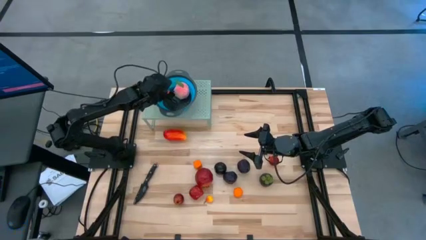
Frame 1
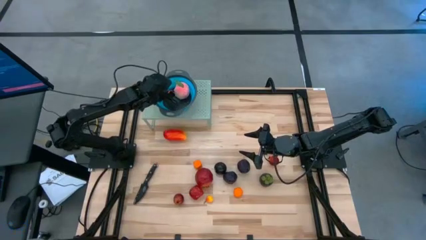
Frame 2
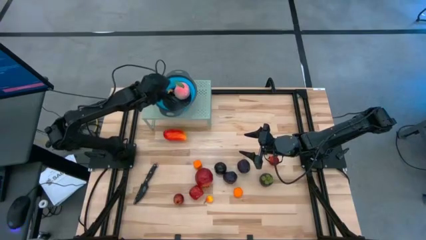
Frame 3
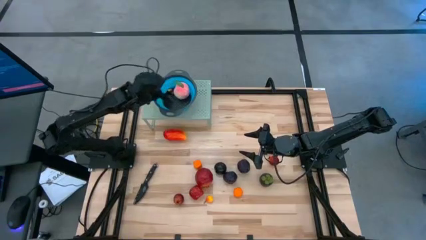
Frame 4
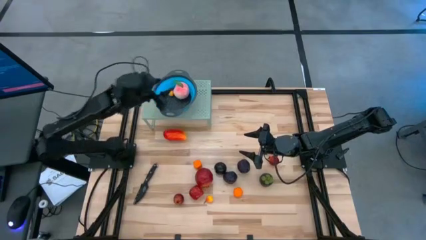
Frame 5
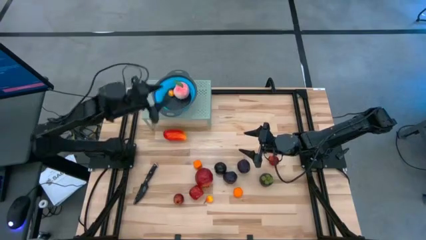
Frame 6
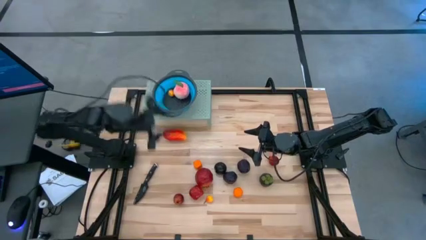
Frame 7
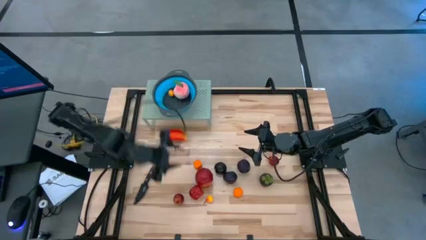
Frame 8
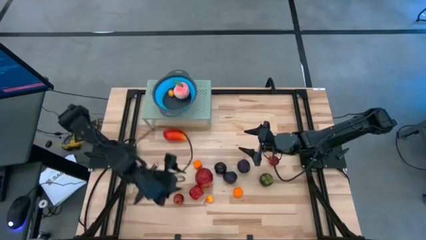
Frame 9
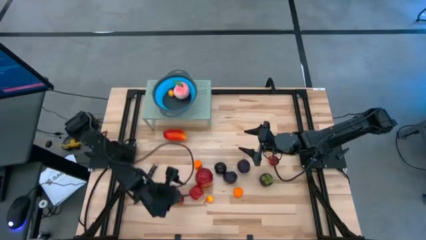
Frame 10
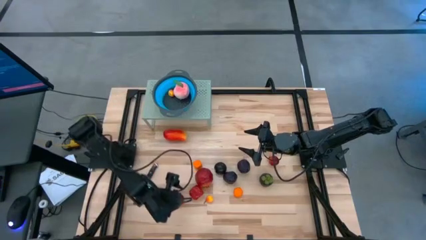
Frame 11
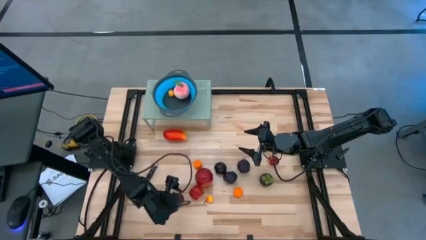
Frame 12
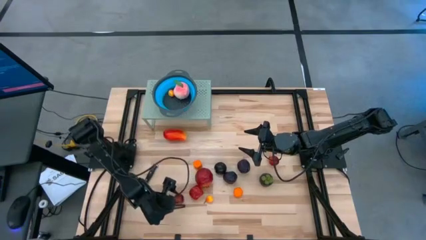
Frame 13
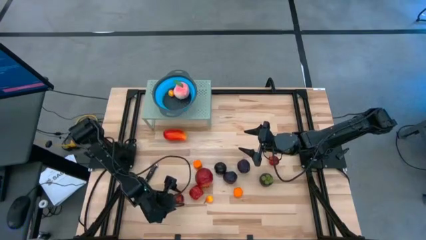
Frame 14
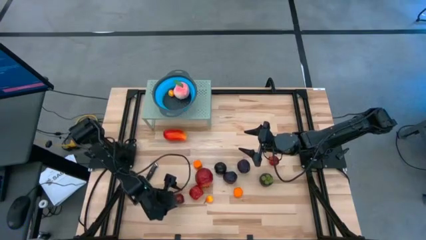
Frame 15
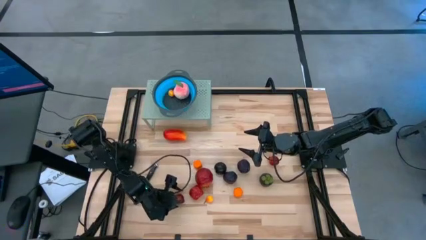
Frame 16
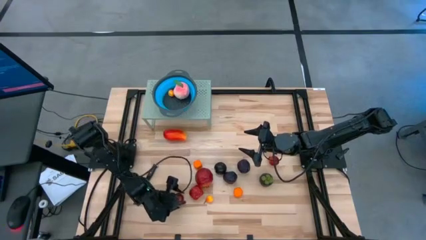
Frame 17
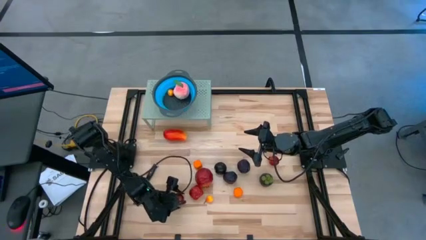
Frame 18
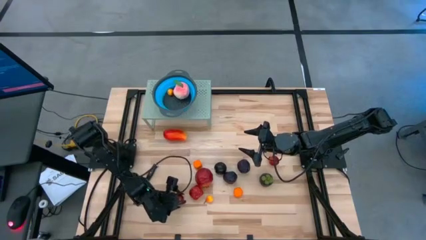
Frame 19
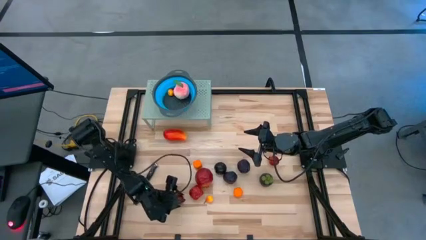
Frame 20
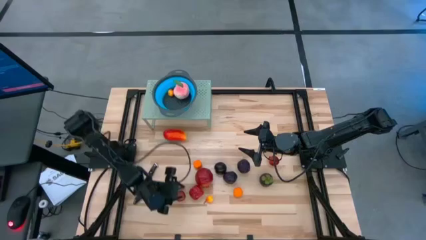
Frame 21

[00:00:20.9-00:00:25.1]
Task: Pick & Place Fruit
Put the bottom red pomegranate into the blue strainer bowl on the shelf

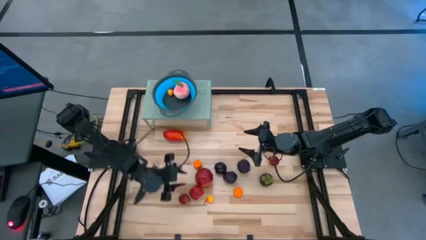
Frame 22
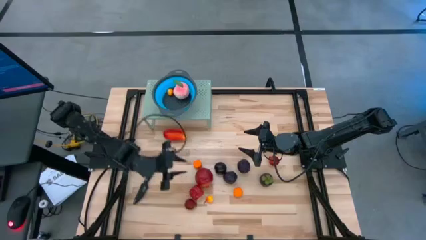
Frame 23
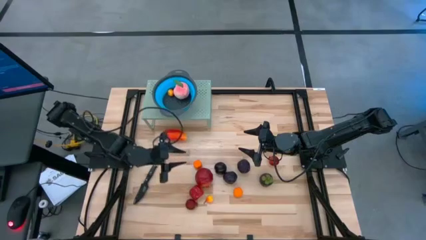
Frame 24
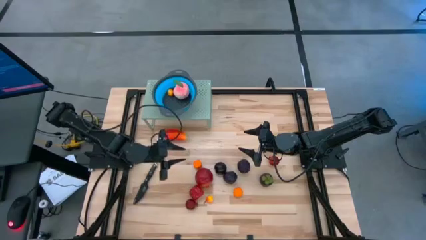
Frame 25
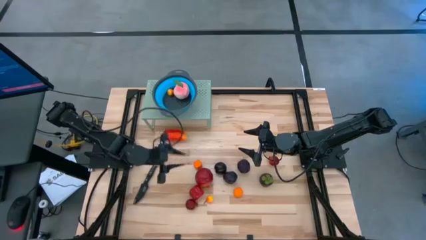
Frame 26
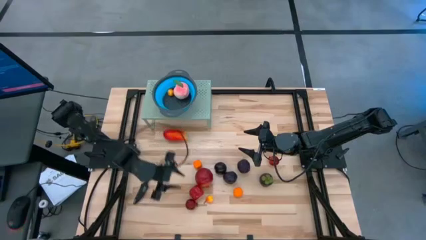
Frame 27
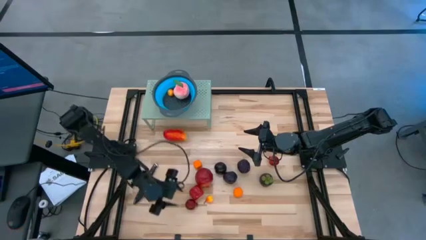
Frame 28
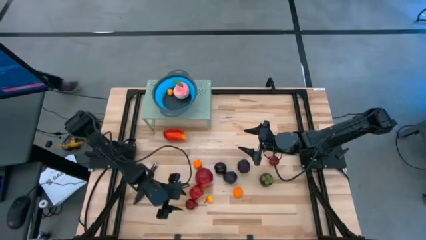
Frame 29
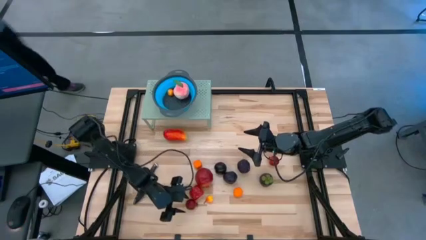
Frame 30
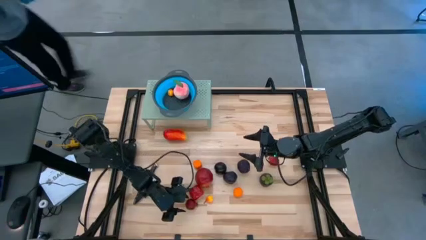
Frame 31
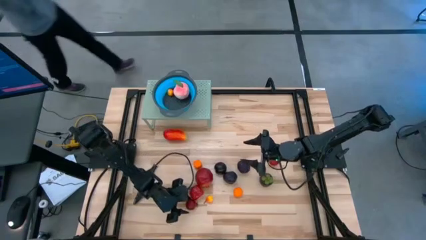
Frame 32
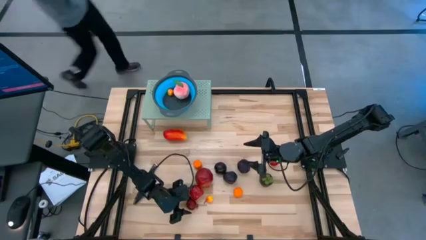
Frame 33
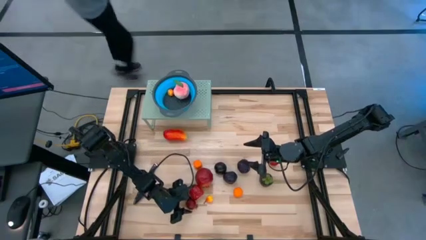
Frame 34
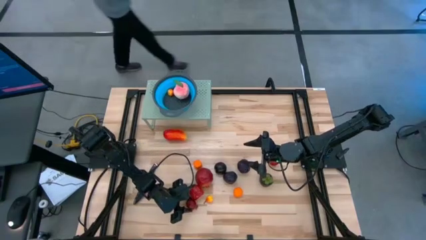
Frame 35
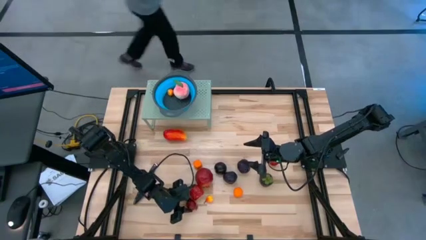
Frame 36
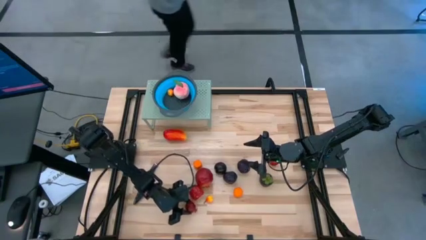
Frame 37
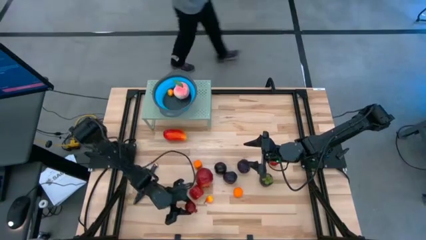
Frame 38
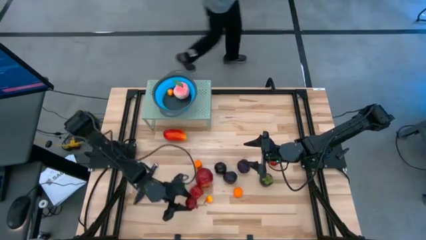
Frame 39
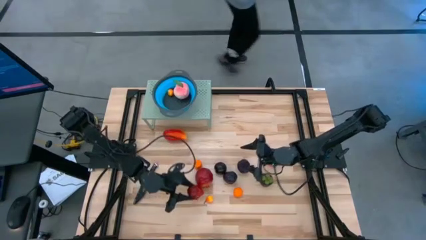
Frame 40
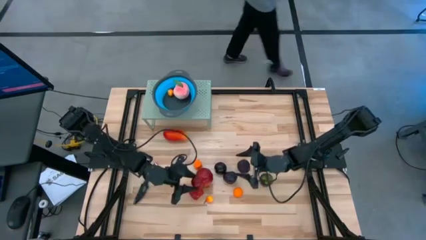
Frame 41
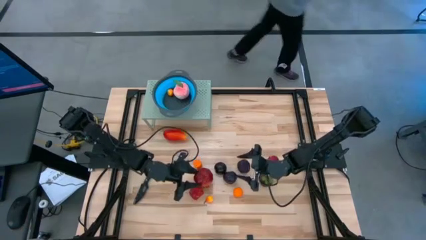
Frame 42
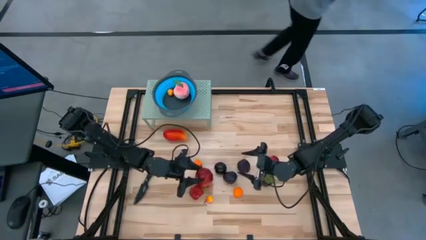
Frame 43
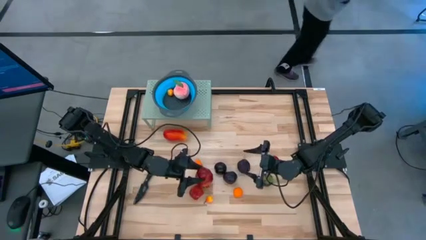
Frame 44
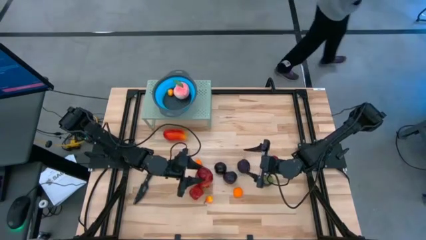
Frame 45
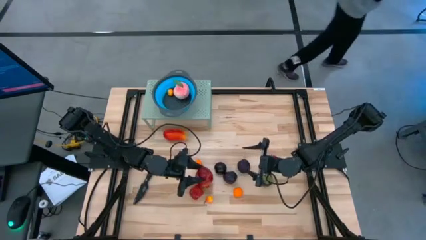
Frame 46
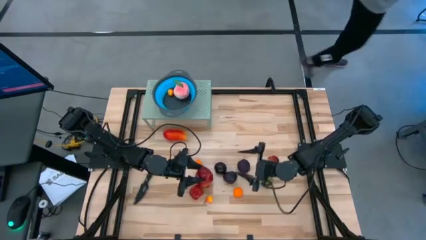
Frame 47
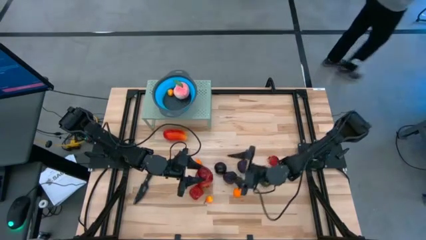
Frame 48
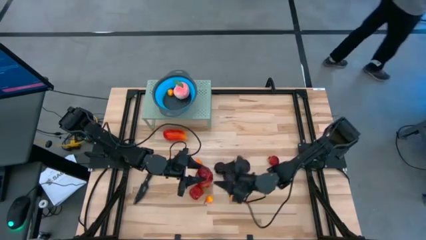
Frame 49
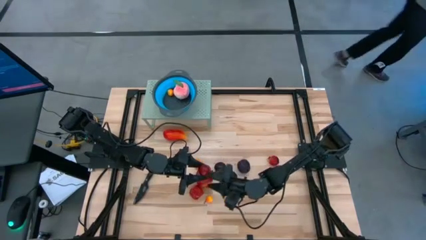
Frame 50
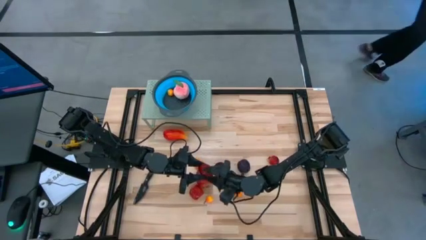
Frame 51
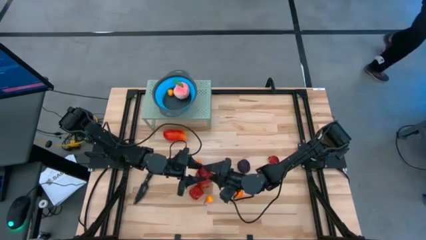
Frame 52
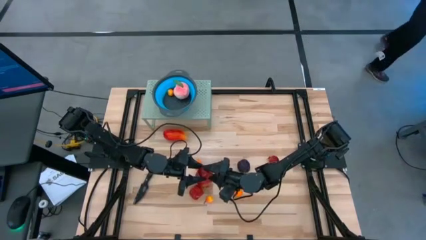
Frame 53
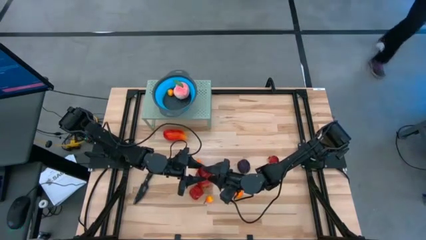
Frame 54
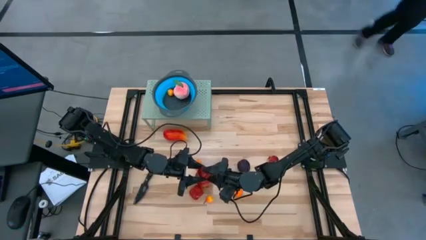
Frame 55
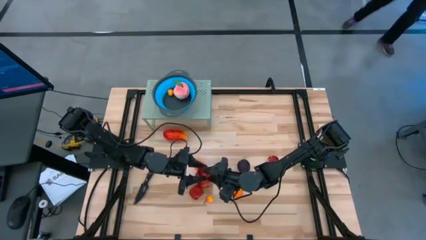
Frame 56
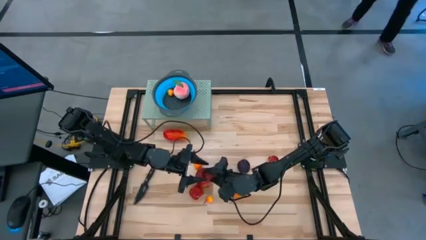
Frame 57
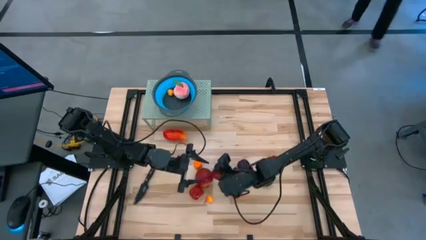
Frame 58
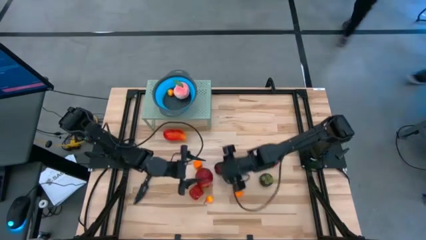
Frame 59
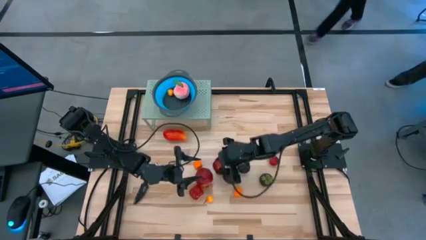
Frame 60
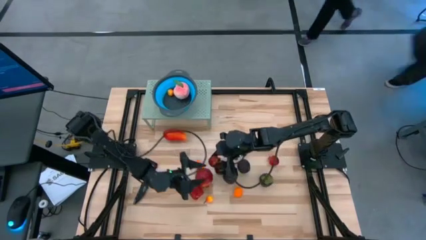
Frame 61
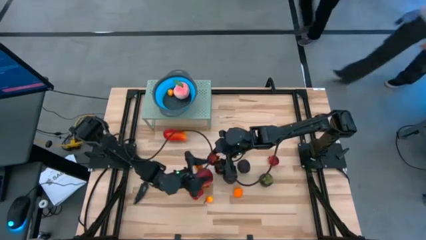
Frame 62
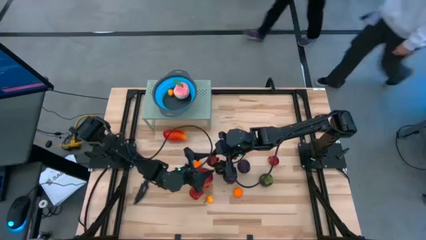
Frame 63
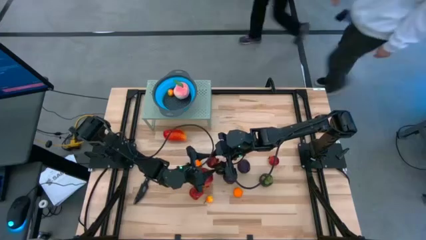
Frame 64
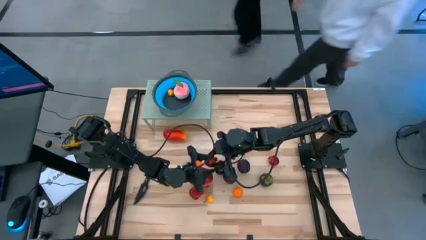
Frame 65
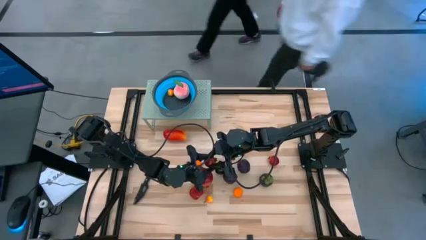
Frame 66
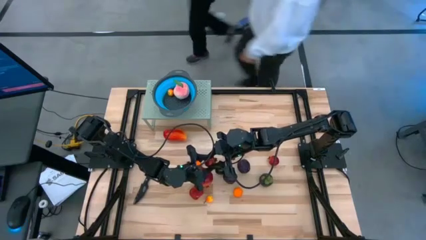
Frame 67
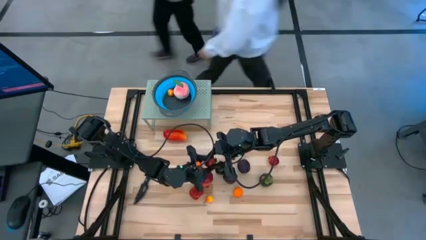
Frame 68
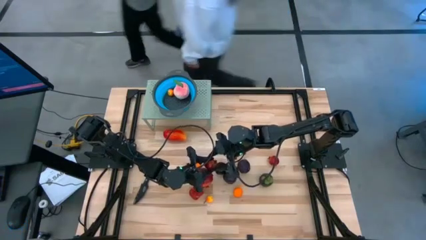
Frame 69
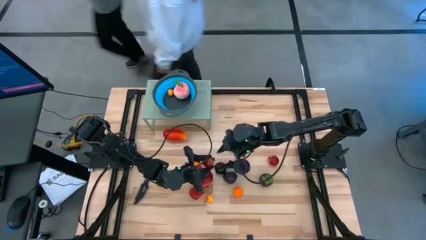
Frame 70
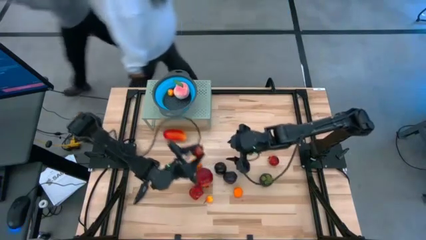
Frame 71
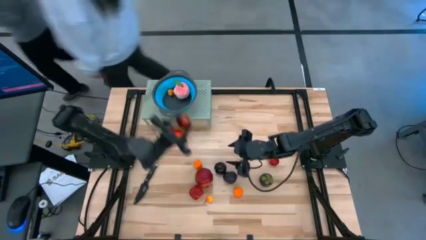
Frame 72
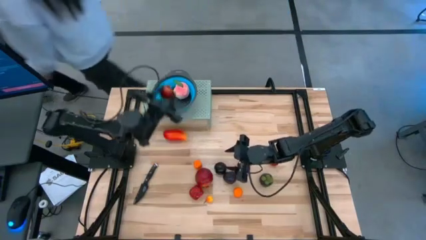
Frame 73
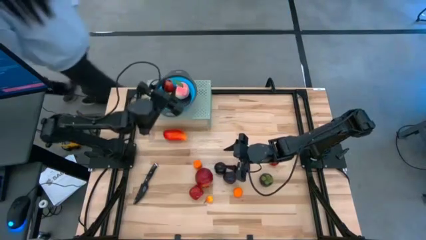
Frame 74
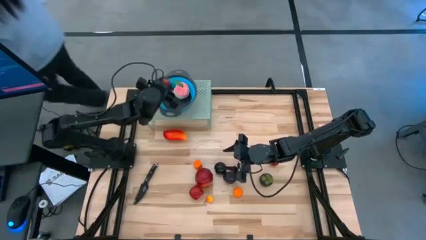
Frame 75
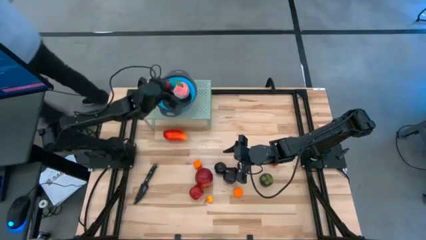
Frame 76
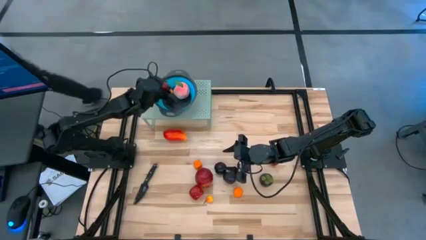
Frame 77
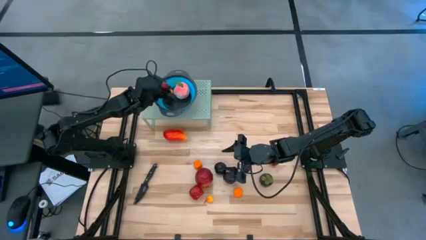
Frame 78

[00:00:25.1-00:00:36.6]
Put the bottom red pomegranate into the blue strainer bowl on the shelf
